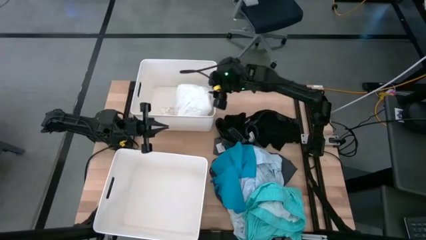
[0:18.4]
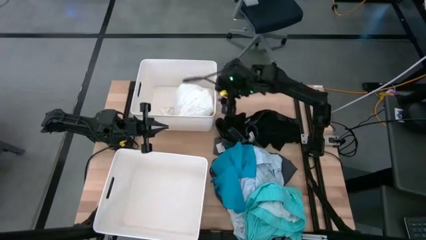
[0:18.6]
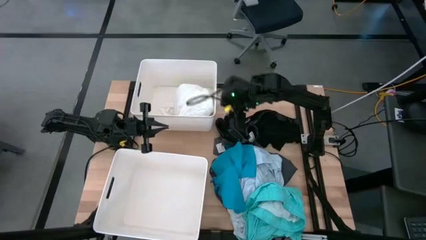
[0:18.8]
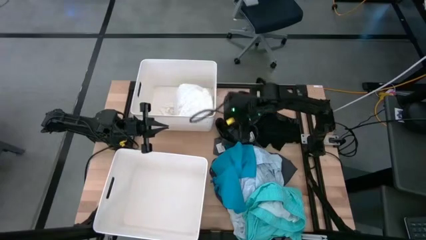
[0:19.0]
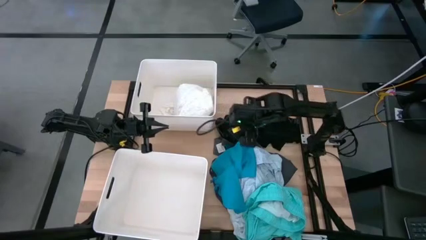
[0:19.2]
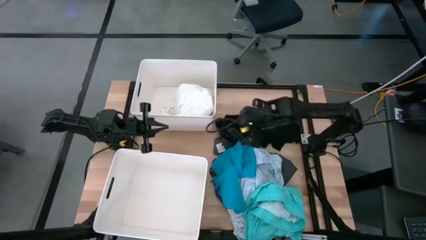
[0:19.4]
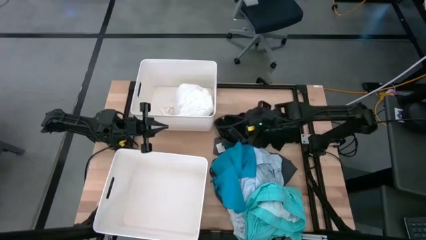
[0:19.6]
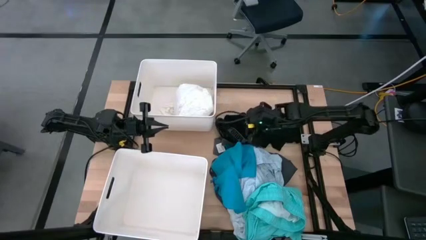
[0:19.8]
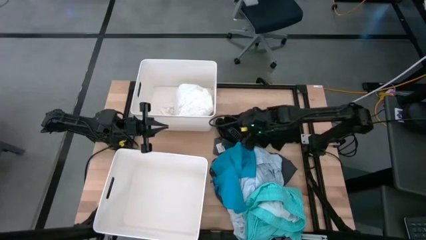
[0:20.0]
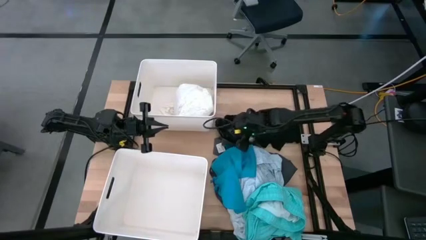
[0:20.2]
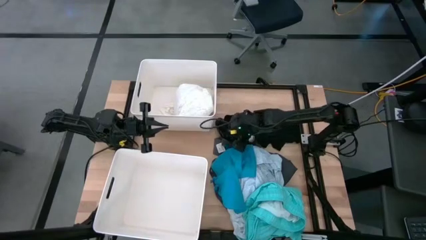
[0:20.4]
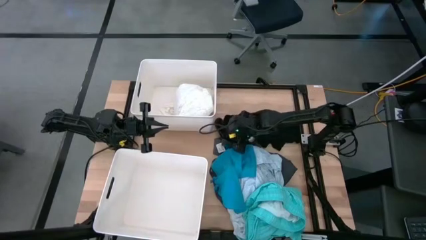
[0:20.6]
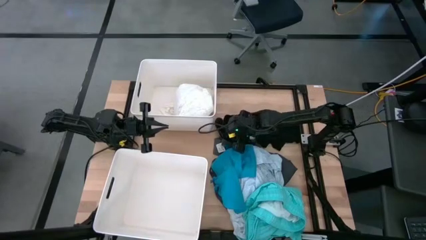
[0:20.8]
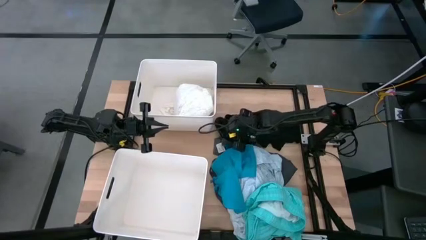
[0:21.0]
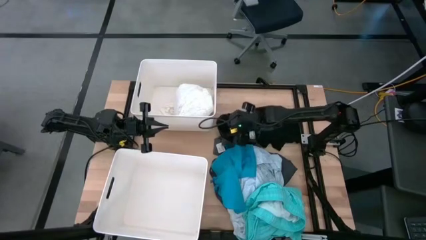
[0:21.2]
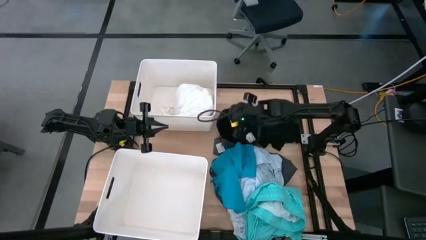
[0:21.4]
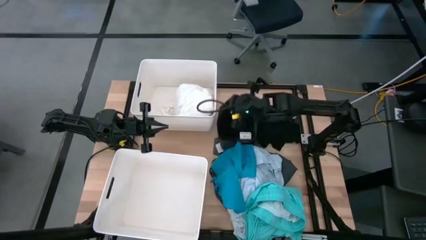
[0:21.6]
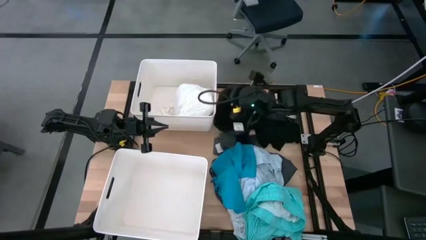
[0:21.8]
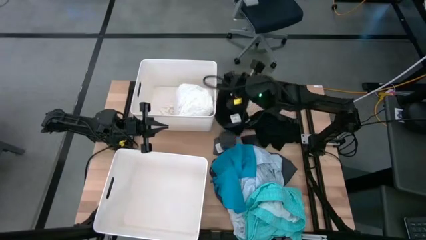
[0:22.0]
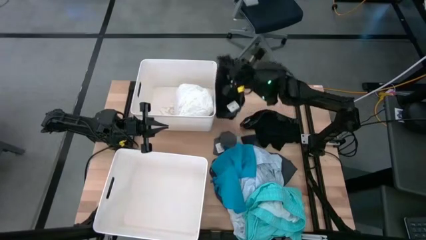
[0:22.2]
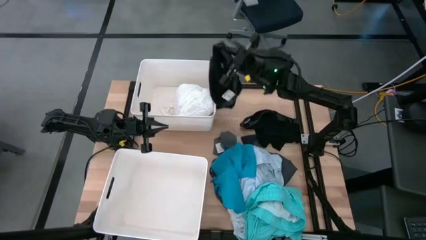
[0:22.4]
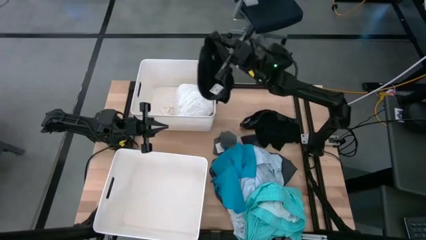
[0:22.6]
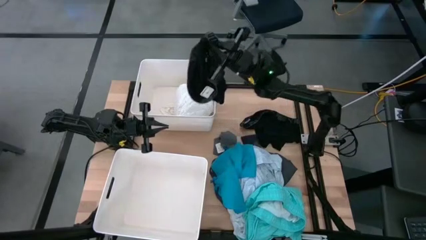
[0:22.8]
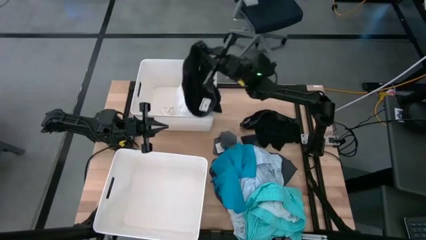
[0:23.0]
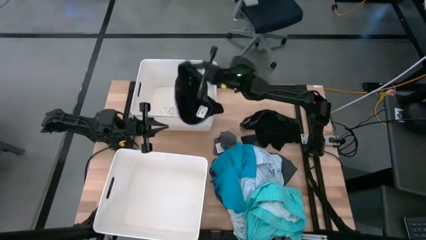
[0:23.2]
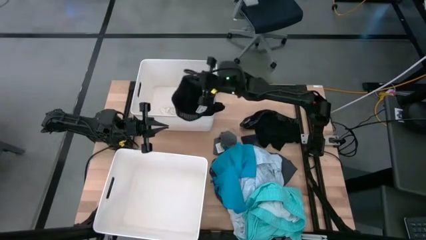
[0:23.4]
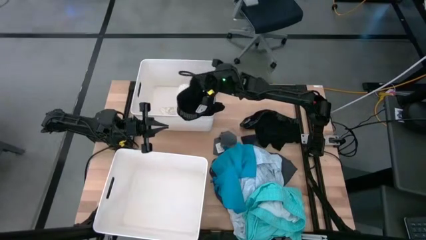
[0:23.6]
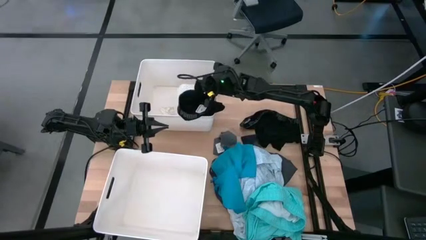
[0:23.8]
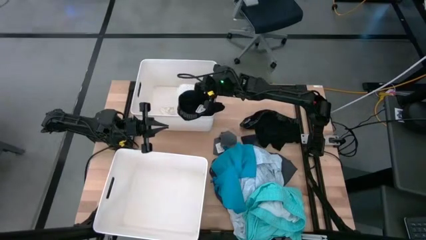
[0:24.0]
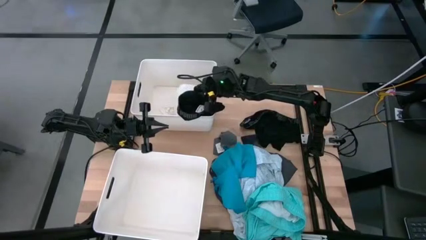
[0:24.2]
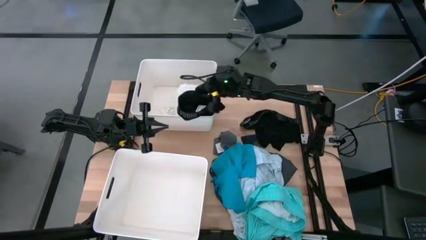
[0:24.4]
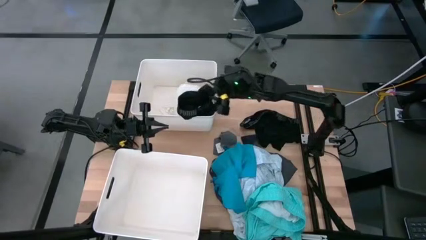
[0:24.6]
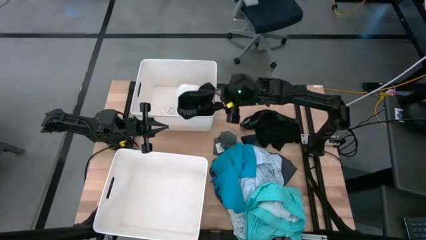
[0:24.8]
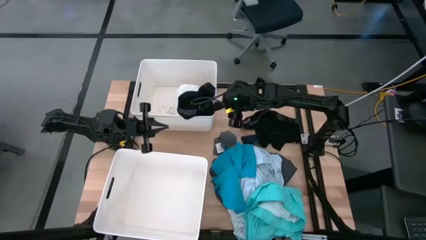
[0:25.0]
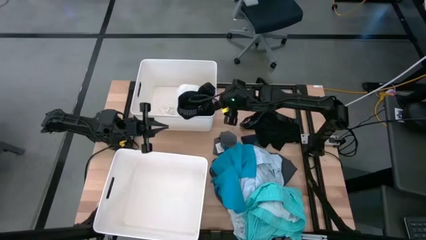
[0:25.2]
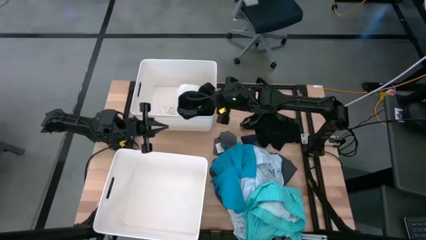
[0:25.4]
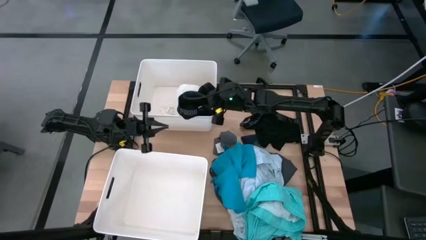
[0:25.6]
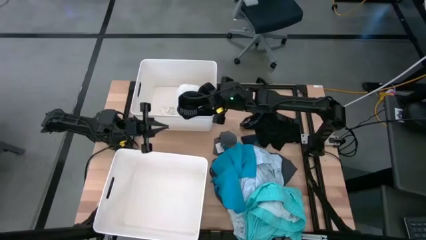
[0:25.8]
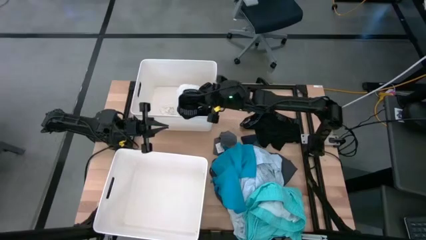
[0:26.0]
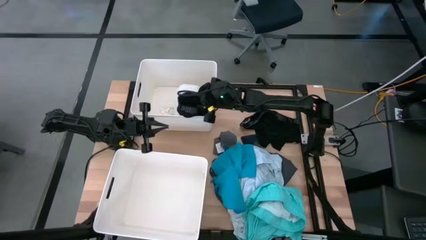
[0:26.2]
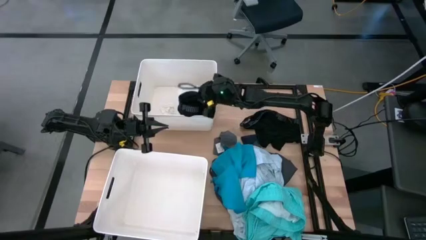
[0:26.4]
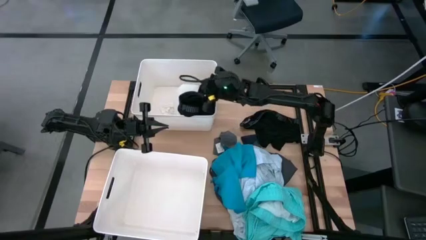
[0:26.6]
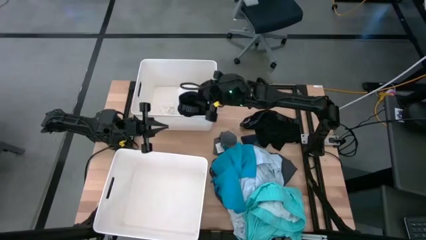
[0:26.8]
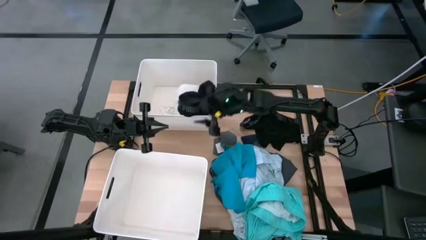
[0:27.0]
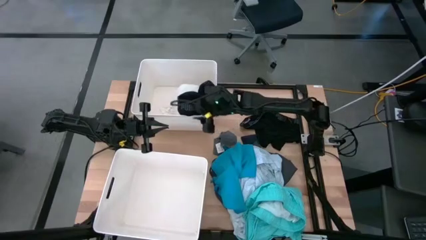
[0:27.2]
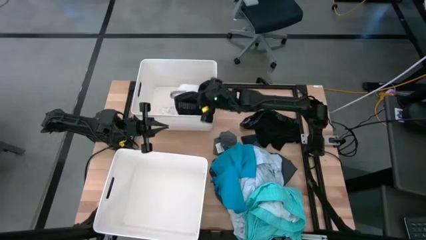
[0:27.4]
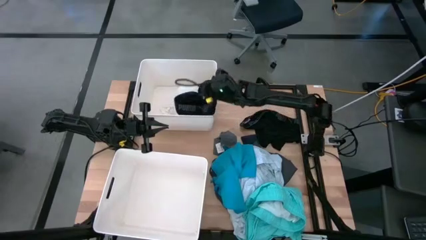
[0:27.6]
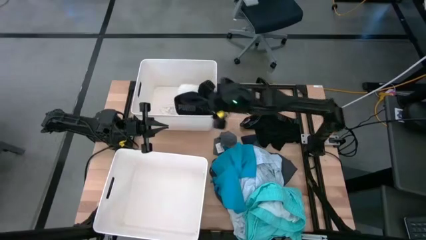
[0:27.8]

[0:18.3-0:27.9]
Task: Sort clothes
Put the black boxer into the top laundry organizer

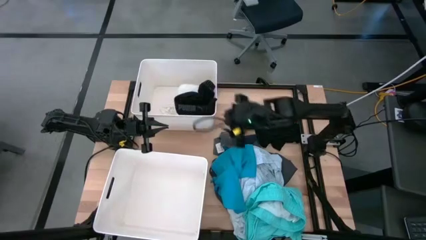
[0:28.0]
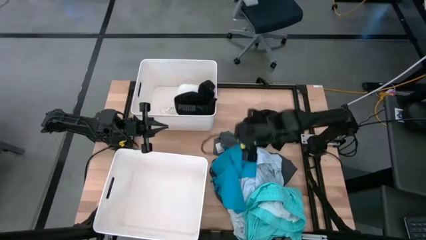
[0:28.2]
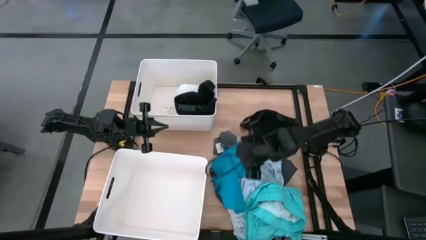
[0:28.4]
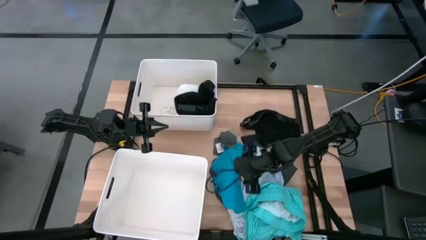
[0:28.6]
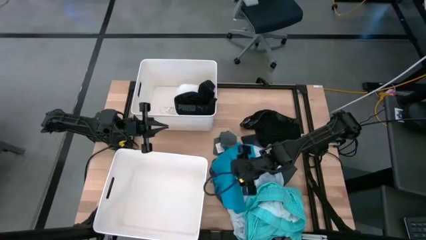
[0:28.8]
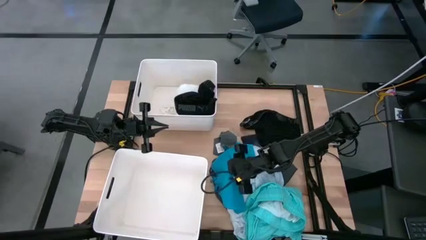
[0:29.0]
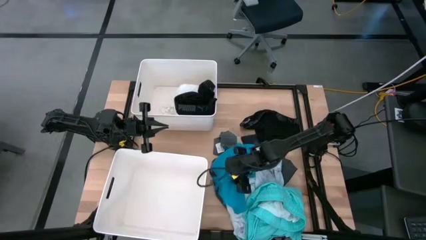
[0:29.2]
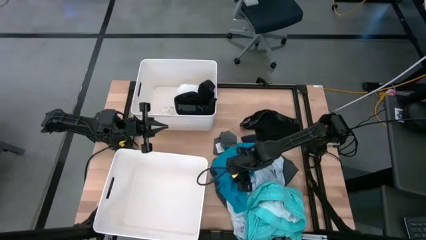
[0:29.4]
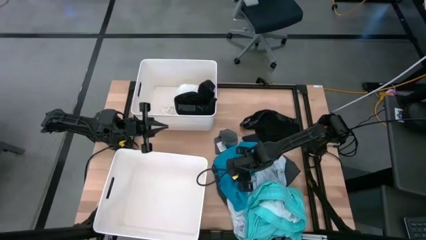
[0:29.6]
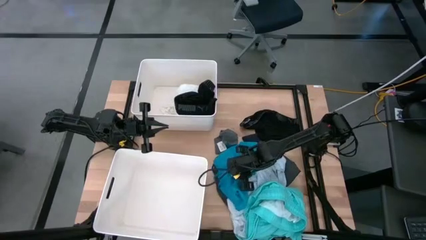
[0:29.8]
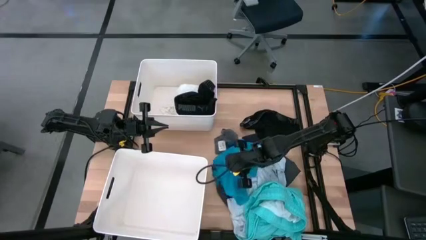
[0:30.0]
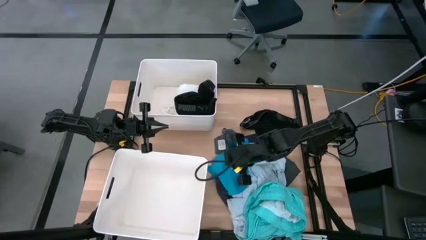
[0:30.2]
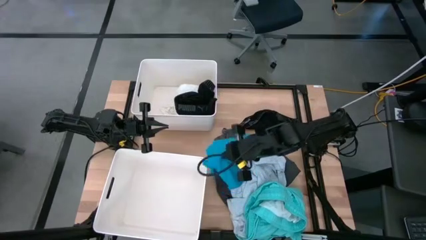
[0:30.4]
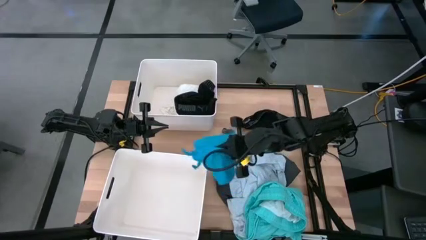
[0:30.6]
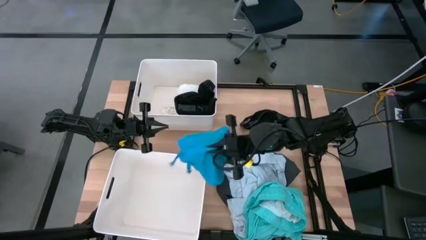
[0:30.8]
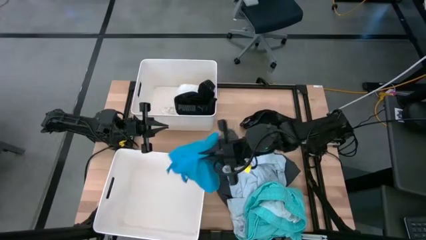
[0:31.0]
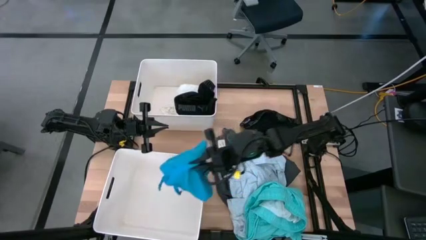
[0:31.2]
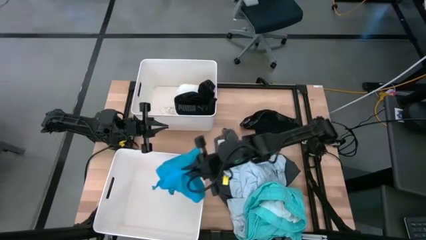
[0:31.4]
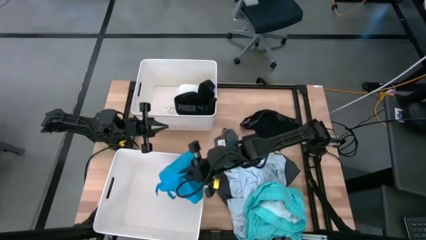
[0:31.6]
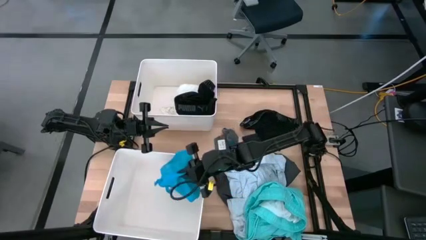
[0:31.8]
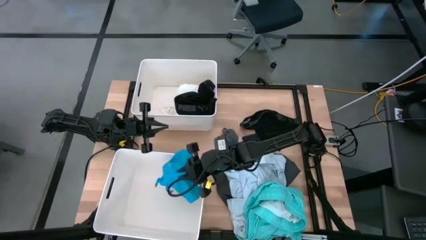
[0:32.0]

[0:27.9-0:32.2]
Put the blue short into the bottom laundry organizer

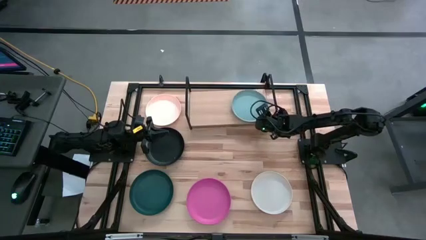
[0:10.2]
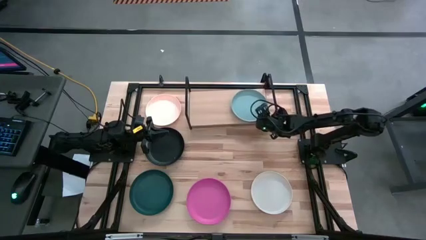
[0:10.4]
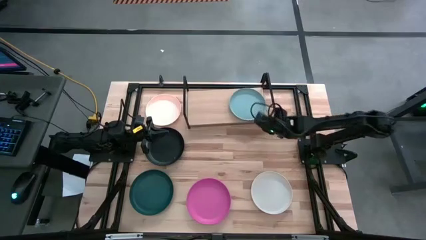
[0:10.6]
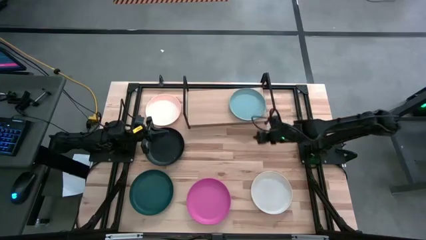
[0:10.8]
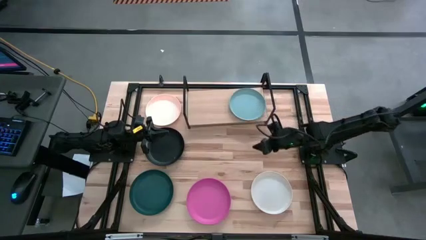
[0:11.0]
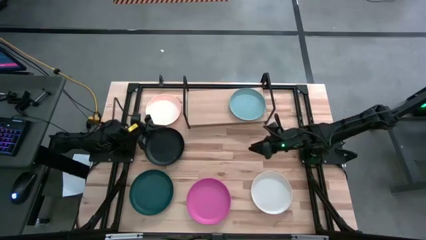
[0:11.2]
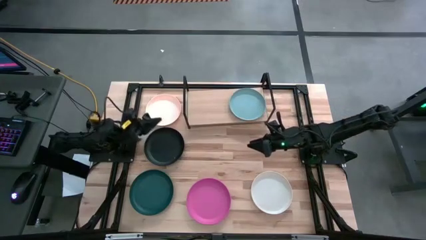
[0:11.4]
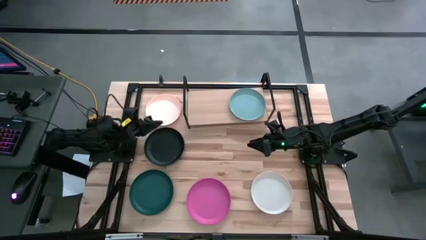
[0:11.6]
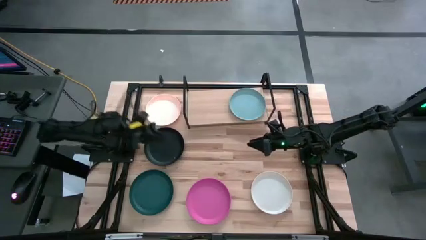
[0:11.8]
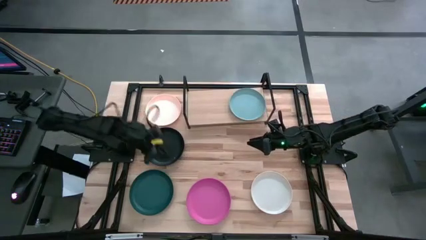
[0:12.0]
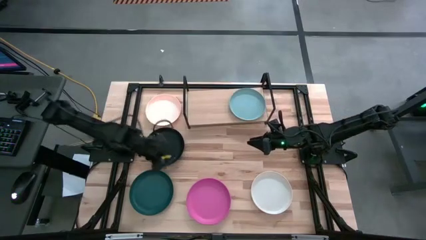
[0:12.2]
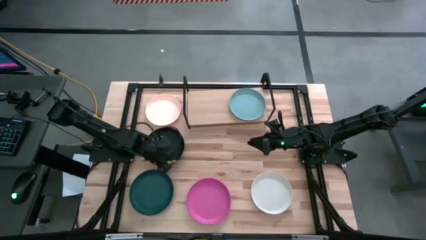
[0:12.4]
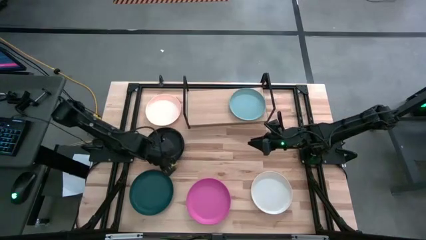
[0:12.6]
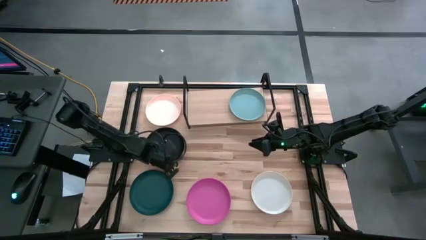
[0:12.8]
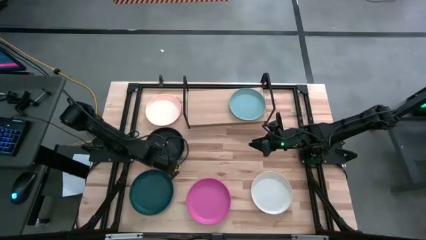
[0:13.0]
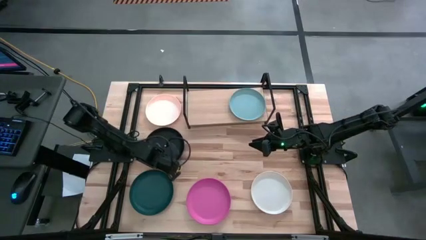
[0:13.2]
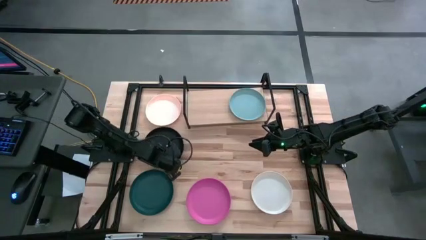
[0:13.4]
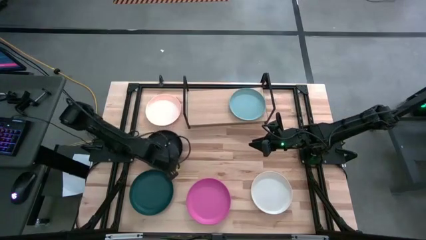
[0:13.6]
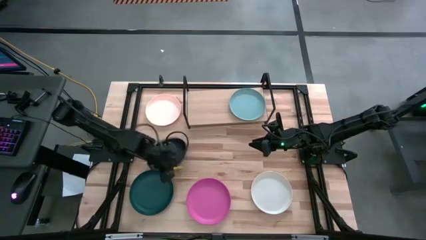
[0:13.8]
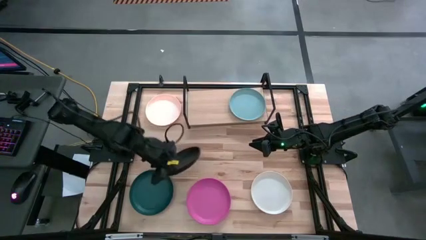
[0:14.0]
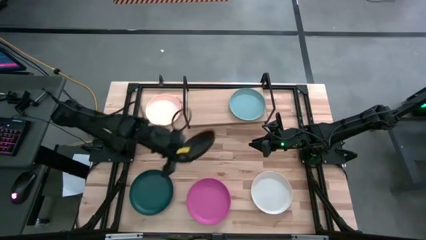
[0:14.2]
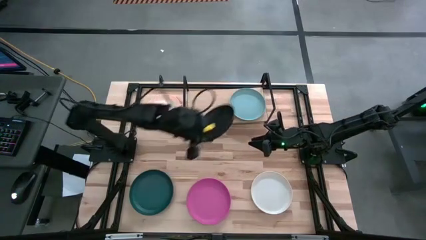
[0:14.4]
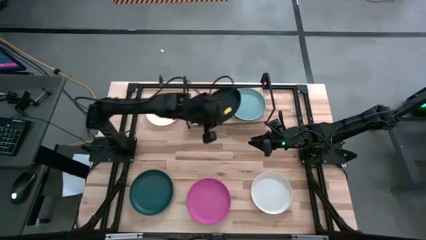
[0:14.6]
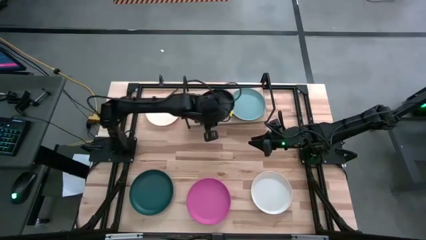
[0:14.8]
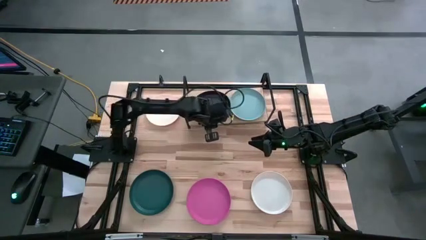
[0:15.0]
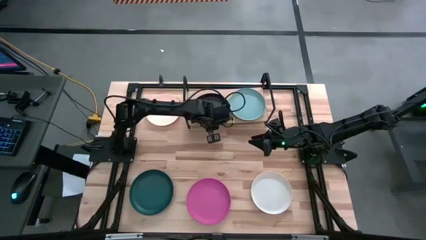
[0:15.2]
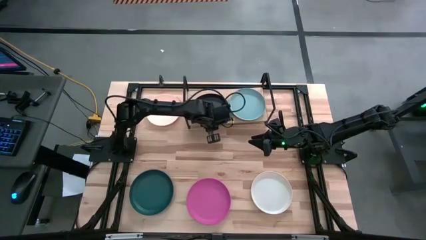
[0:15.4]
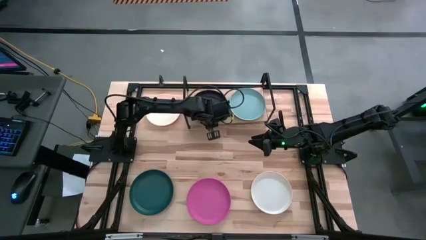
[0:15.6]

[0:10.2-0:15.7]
Task: Place and stack plates onto a shelf
Put the black plate beside the light blue plate on the shelf
